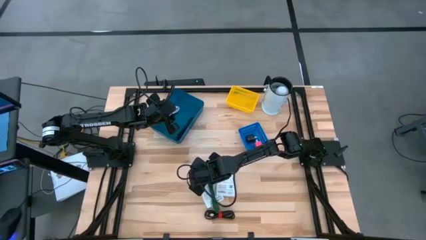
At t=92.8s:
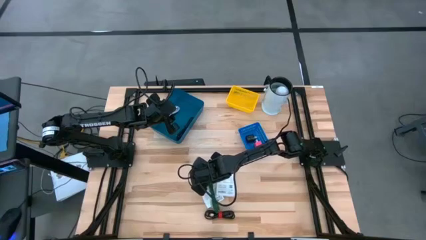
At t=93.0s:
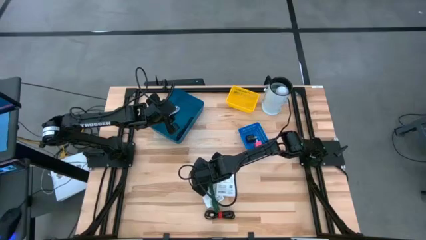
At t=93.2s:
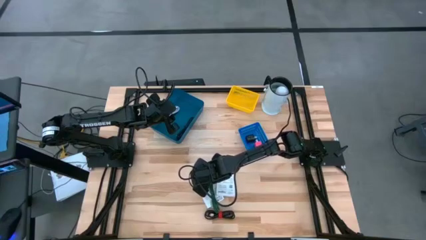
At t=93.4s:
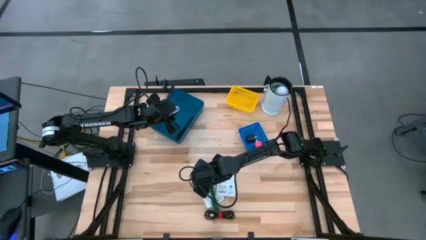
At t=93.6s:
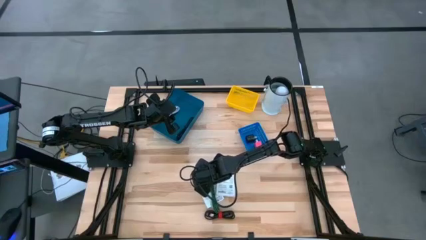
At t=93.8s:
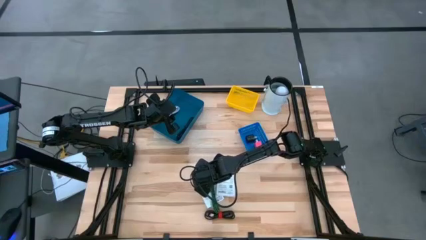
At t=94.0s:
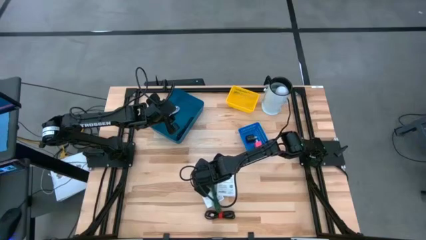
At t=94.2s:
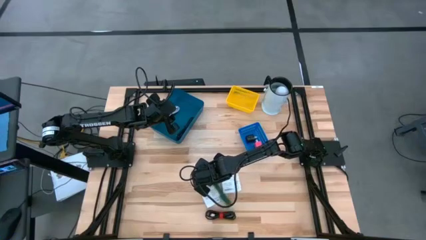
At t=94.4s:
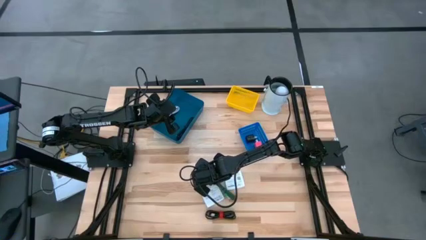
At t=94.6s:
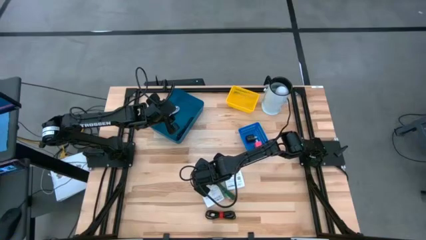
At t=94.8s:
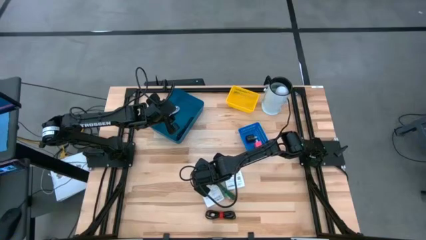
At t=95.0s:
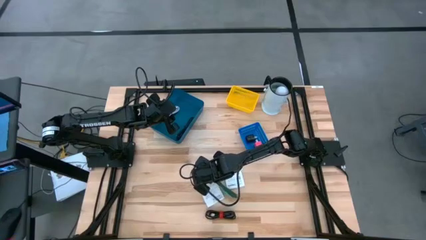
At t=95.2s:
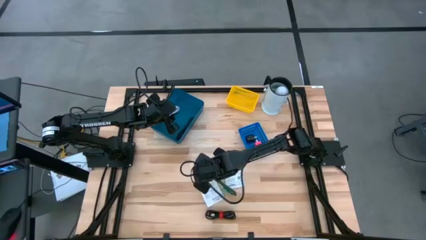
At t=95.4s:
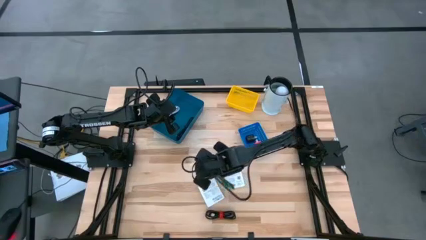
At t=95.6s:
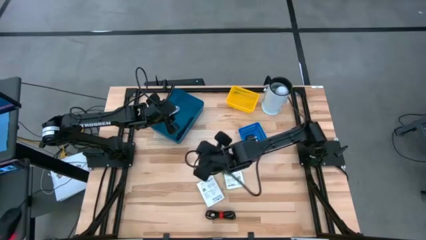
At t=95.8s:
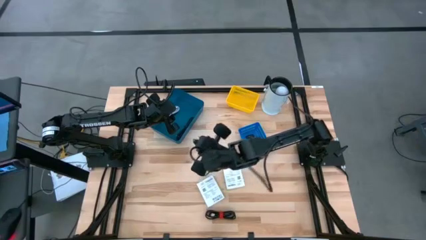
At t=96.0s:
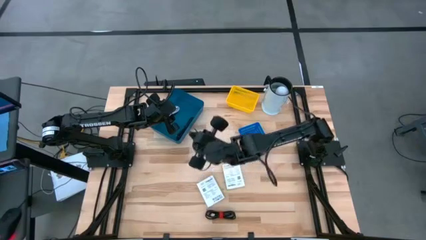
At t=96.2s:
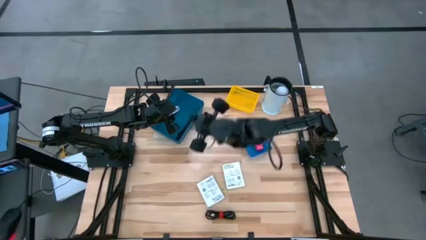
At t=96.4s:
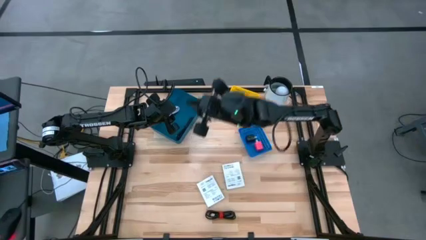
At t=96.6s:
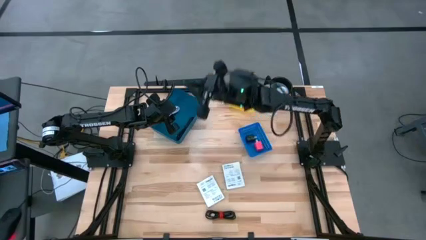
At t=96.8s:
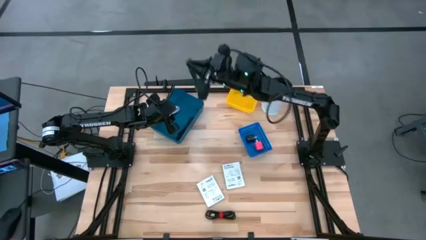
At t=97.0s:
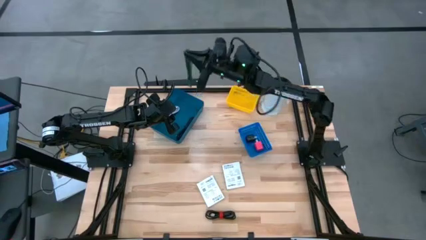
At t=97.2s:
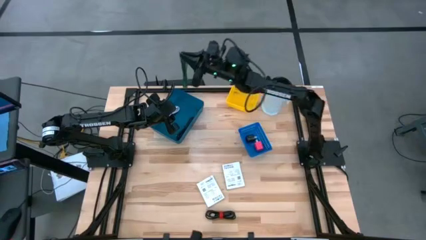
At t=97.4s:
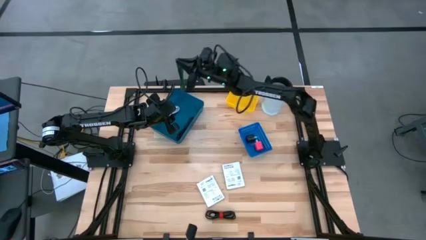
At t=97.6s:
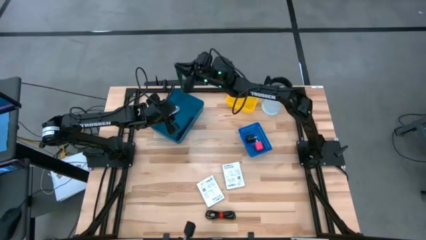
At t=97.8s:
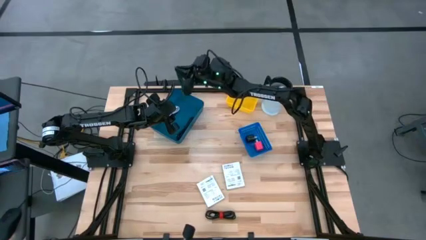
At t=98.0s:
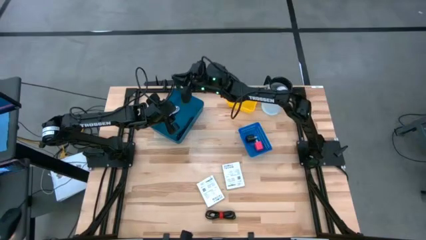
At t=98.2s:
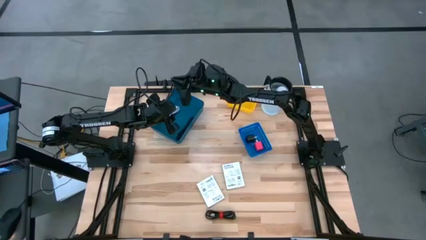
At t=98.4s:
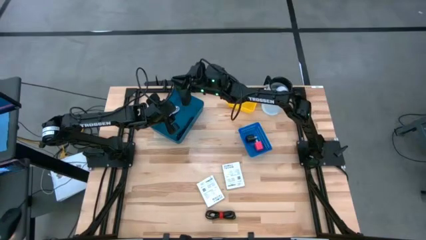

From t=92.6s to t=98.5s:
Task: Pick and place items into bin
Put the green charger cable into the dark blue bin

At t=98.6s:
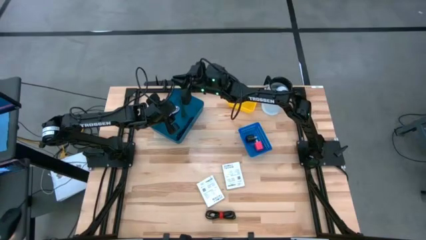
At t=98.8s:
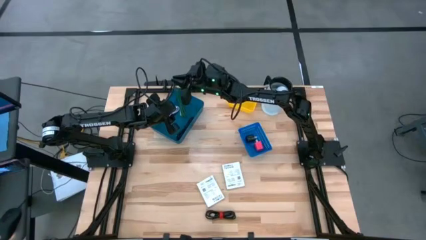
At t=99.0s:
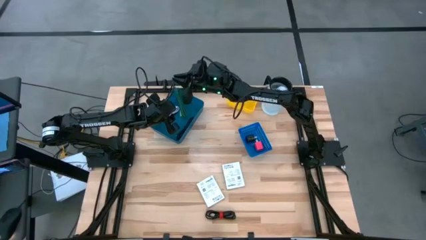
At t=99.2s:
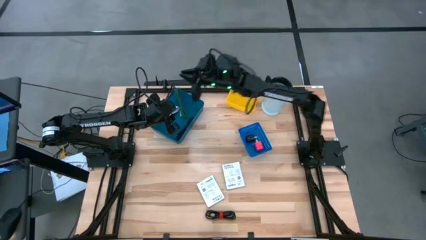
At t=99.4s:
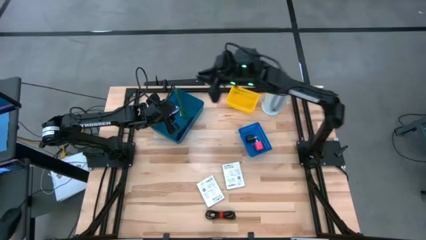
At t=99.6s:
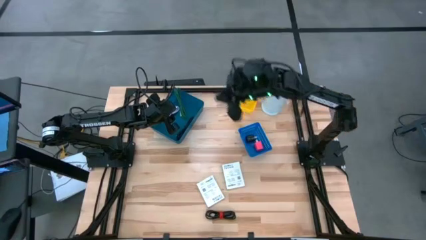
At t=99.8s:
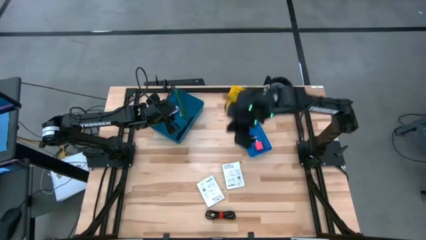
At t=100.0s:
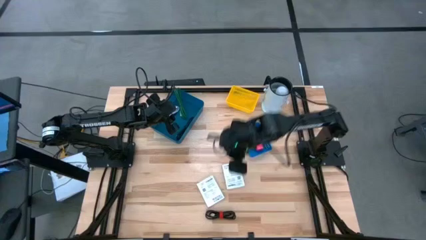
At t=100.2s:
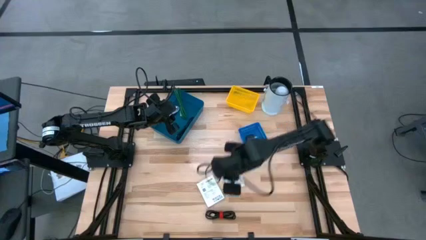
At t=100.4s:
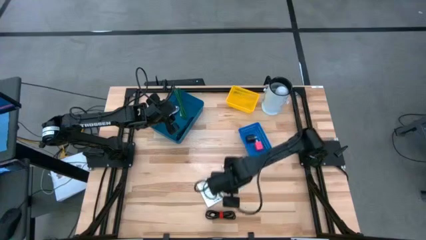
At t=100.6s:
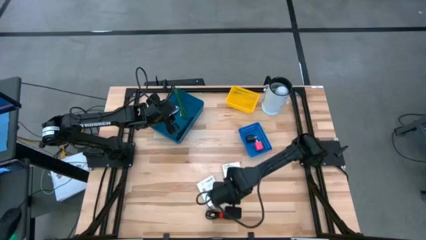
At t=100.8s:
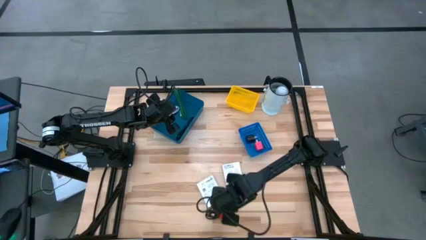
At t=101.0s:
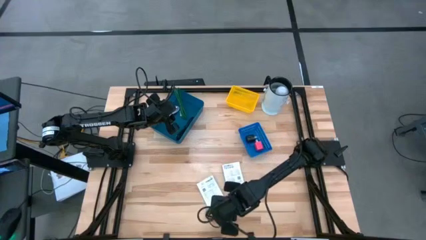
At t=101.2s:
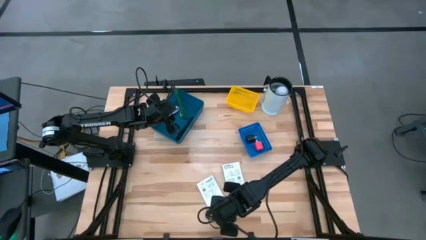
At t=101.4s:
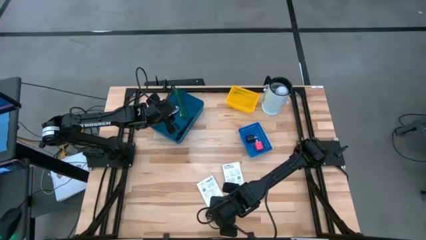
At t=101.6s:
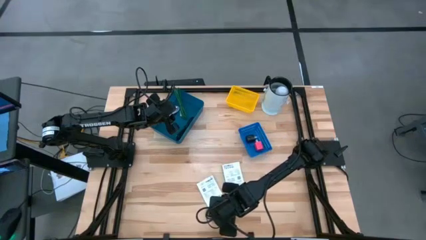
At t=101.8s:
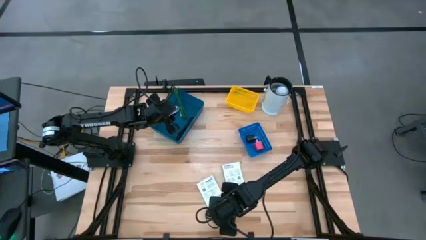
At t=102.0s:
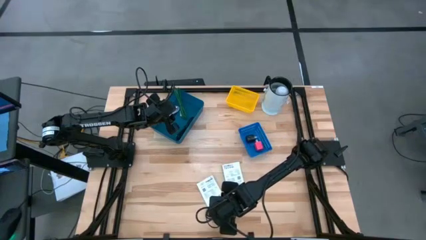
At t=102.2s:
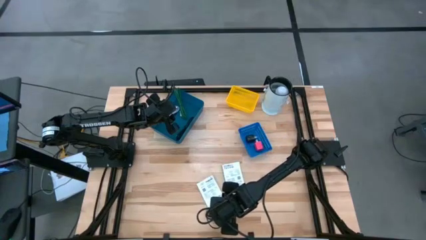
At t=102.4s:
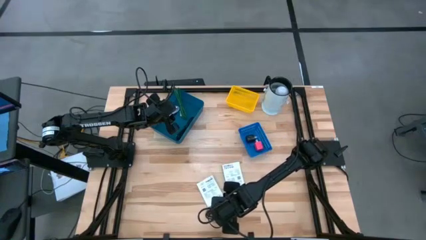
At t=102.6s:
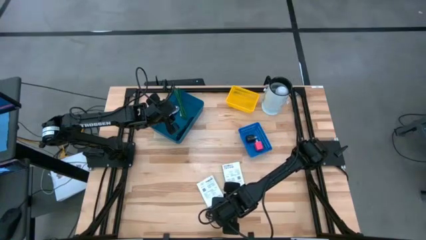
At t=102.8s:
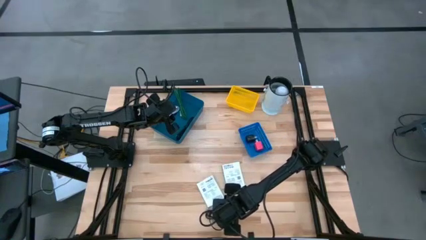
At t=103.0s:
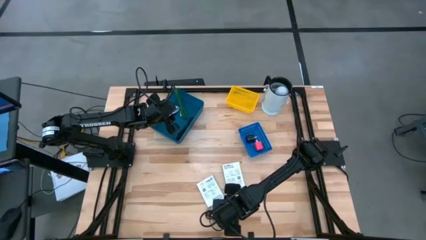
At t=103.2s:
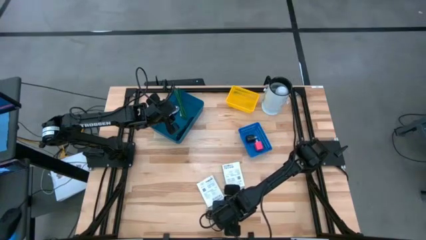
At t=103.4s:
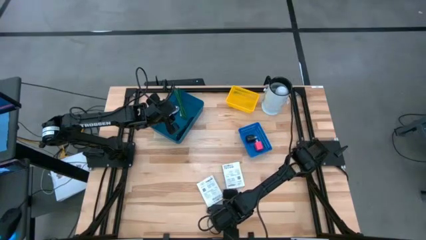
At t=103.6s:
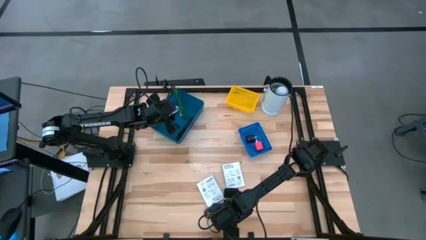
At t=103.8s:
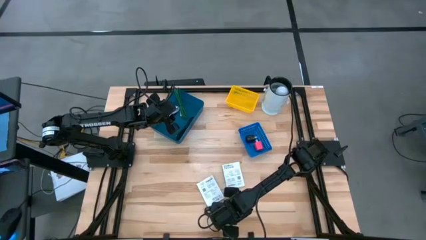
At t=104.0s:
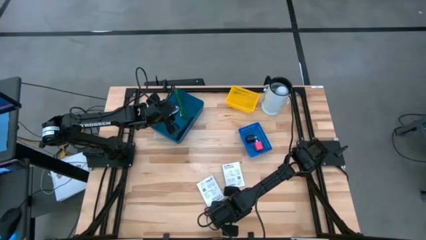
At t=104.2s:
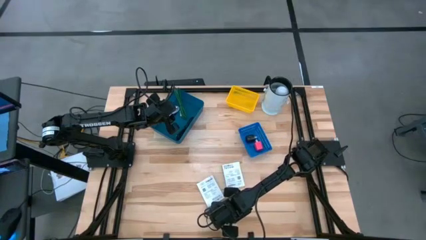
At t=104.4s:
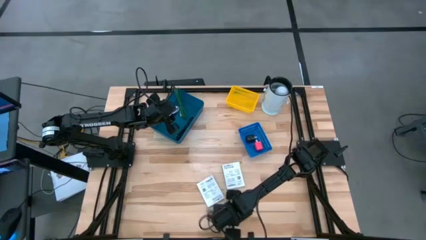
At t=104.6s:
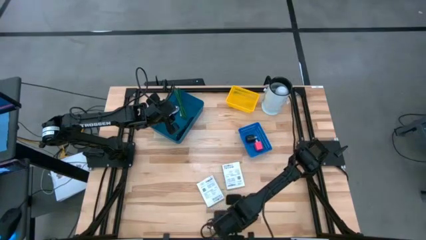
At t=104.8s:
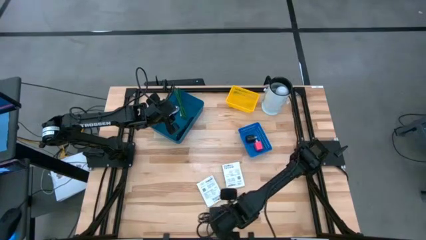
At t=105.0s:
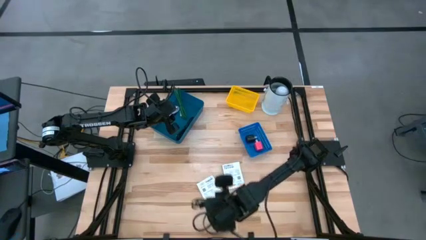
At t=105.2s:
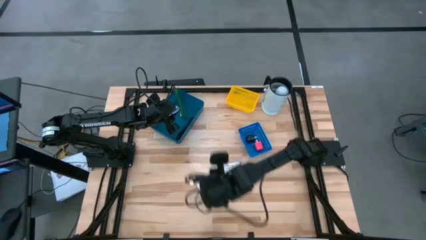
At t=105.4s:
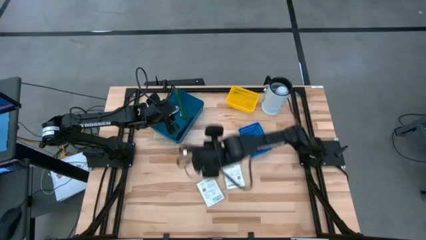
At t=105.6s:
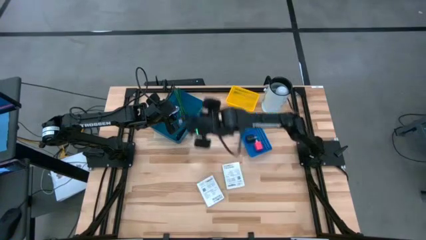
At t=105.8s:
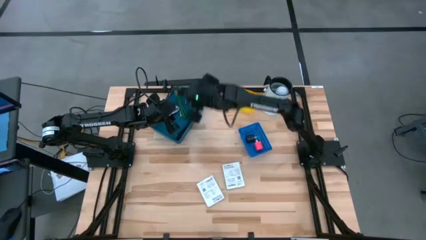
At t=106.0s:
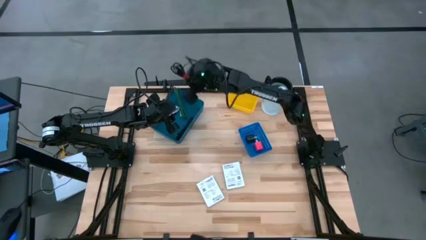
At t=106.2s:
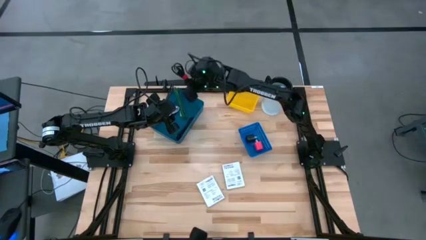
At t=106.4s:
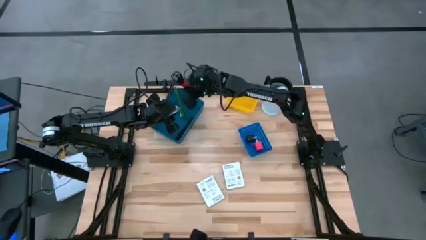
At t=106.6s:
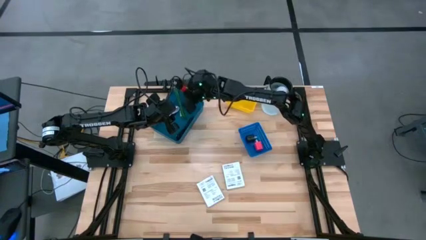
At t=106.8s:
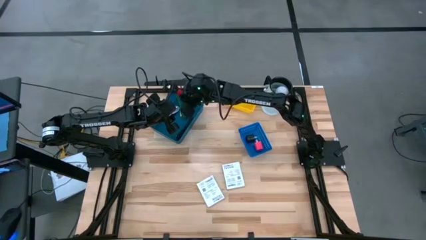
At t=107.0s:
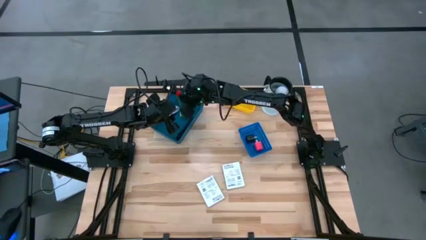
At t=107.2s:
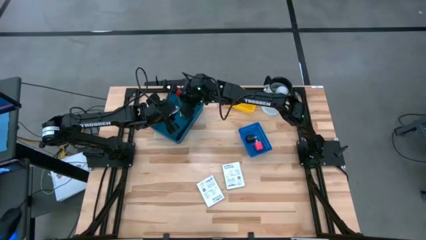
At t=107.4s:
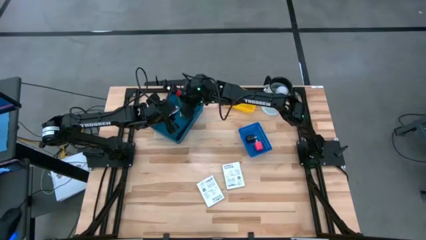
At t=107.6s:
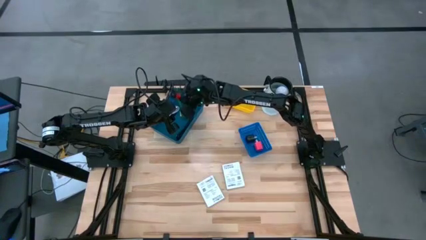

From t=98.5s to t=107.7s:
Put the black charger cable into the dark blue bin

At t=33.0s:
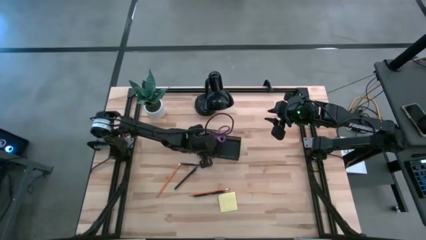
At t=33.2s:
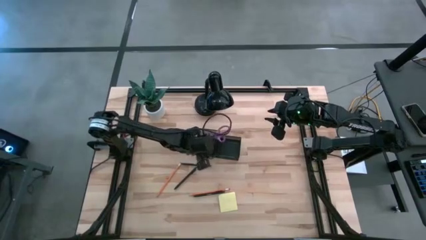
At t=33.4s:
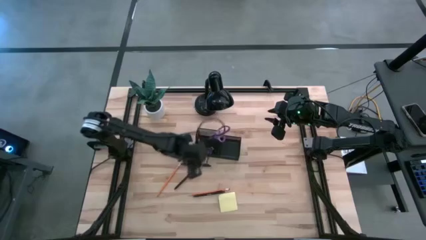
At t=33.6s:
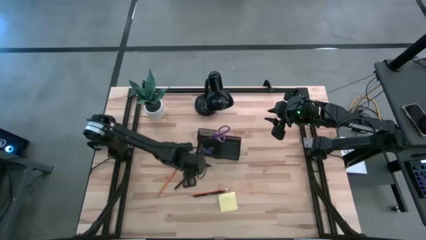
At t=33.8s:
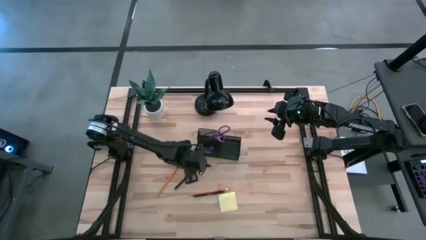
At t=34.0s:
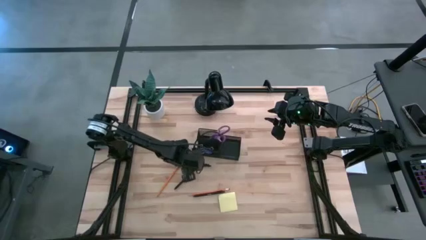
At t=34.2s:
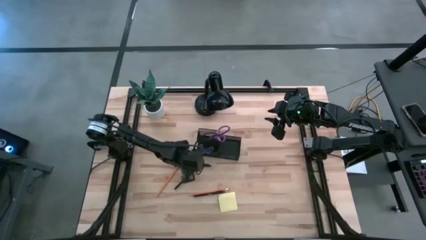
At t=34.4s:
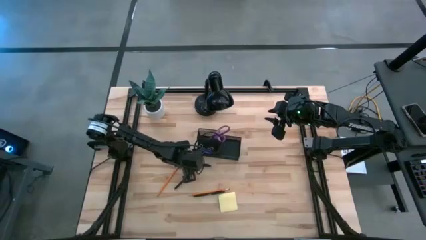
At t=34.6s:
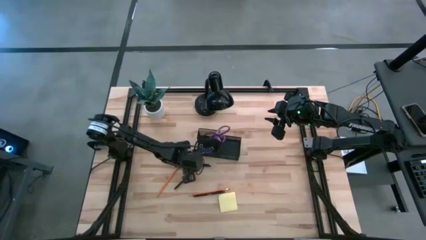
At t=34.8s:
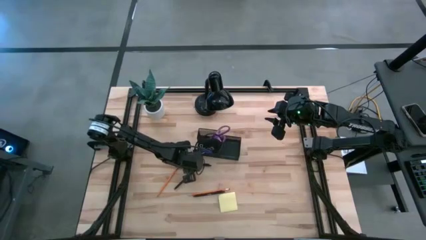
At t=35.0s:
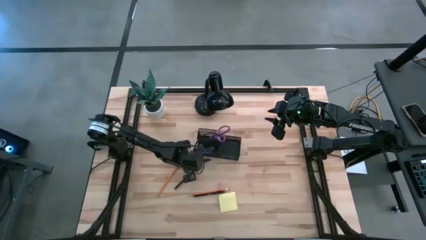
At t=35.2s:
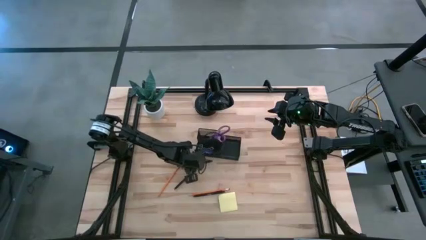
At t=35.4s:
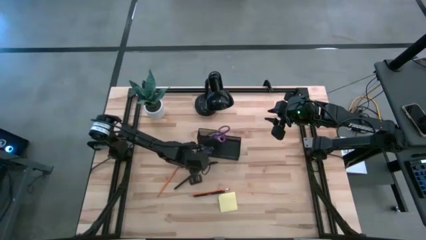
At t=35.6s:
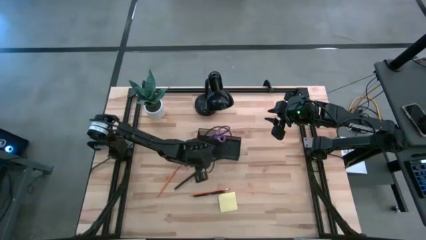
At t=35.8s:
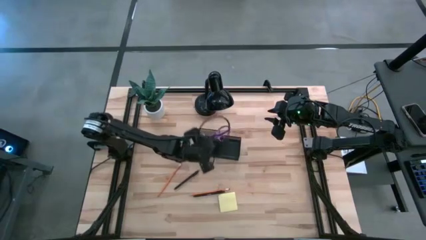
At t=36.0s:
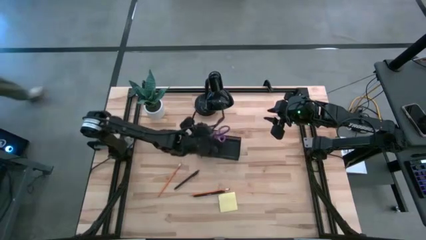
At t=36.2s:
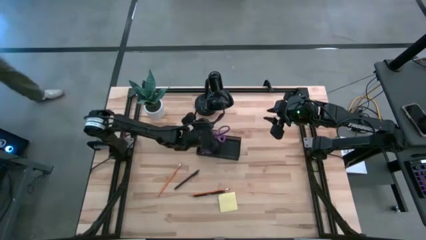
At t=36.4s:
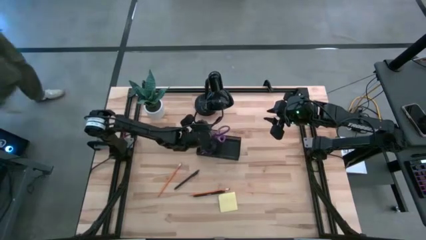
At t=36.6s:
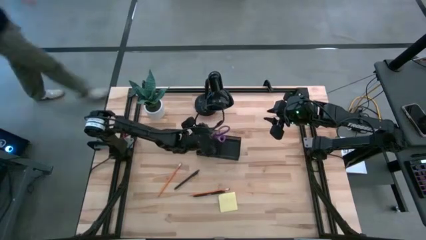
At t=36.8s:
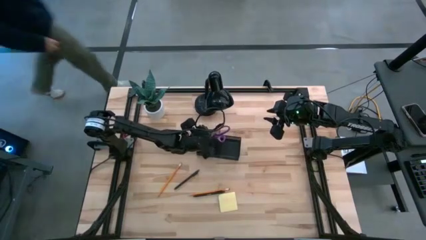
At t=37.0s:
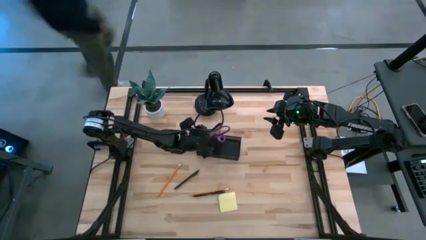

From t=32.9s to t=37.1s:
Task: Pick and place office supplies into organizer
Put the top black pen into the black desk organizer
